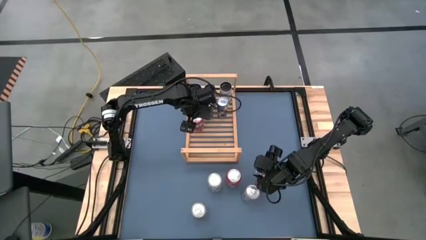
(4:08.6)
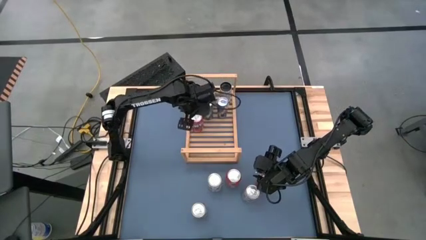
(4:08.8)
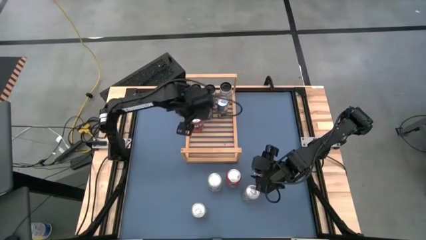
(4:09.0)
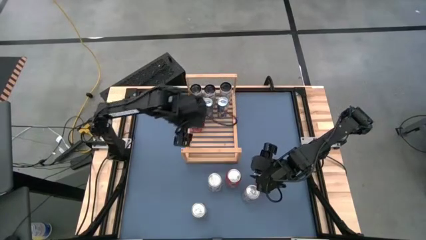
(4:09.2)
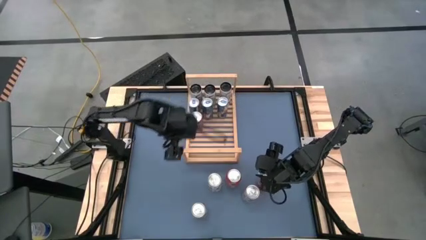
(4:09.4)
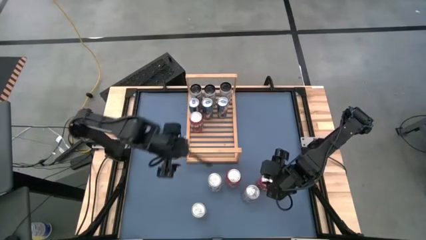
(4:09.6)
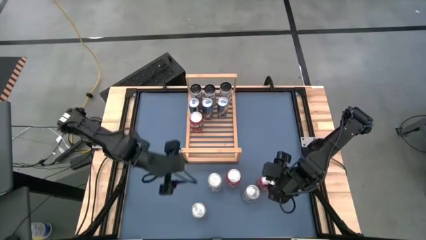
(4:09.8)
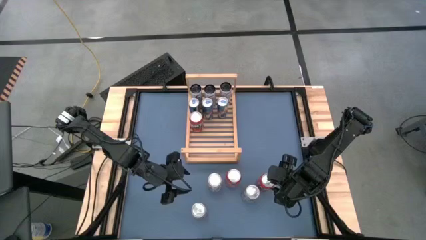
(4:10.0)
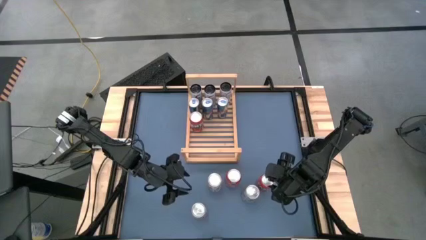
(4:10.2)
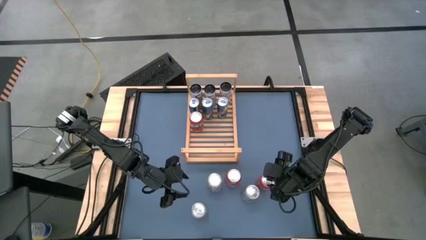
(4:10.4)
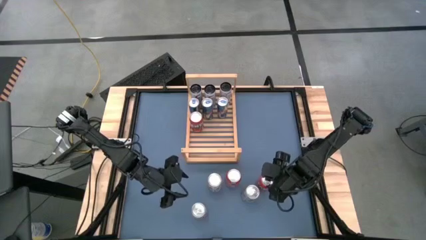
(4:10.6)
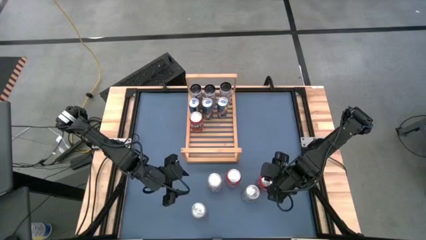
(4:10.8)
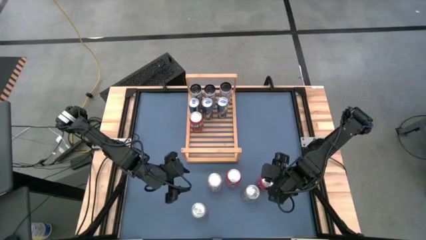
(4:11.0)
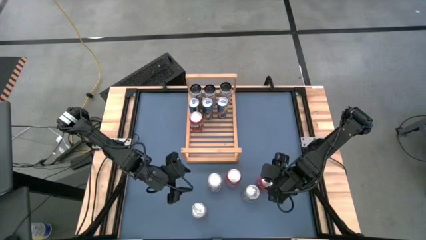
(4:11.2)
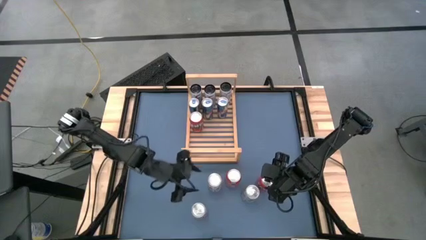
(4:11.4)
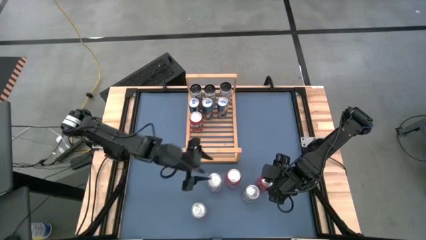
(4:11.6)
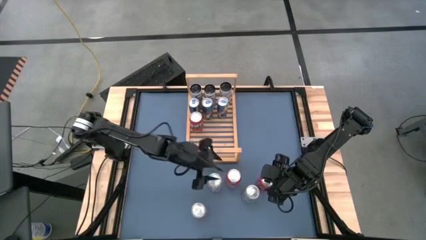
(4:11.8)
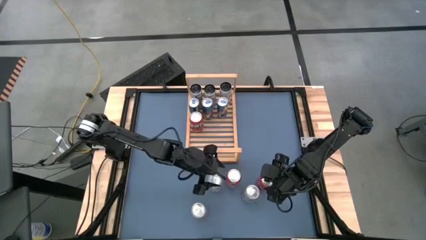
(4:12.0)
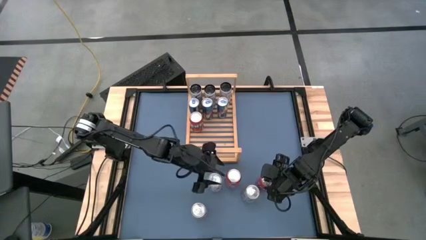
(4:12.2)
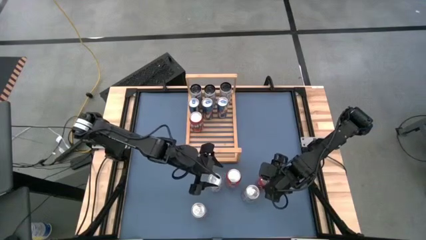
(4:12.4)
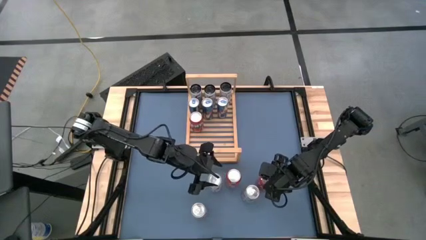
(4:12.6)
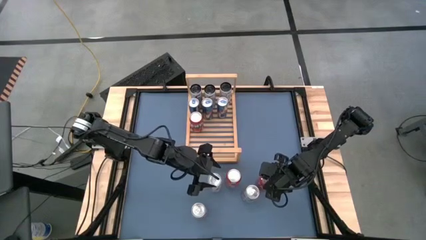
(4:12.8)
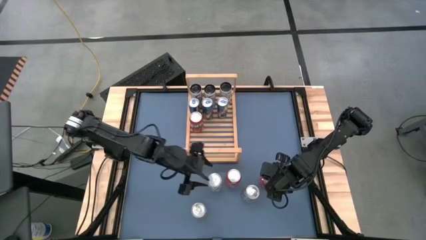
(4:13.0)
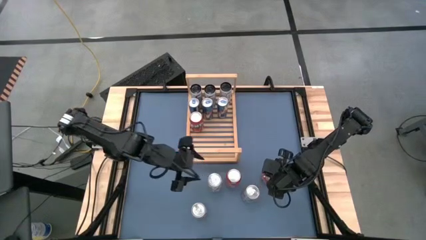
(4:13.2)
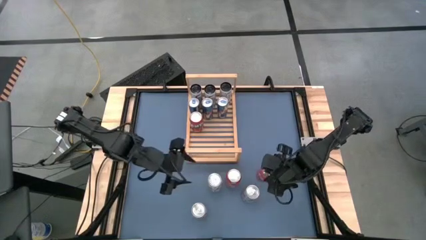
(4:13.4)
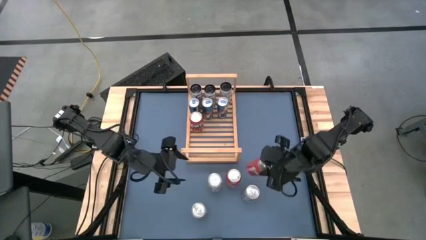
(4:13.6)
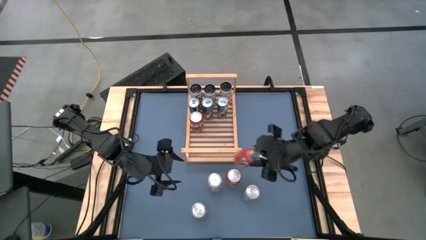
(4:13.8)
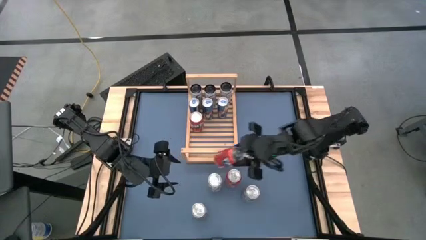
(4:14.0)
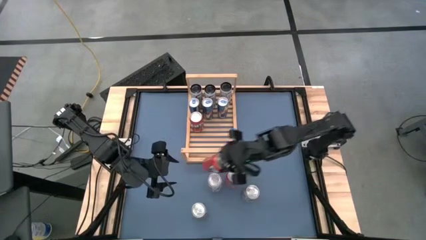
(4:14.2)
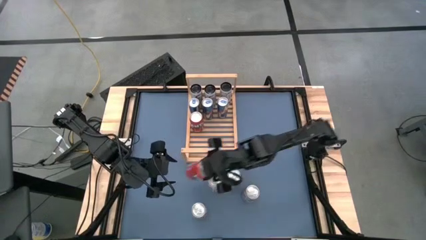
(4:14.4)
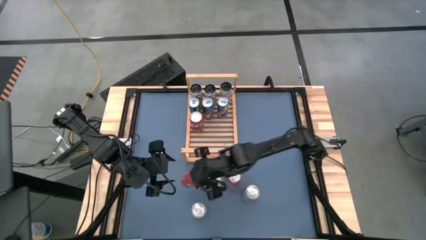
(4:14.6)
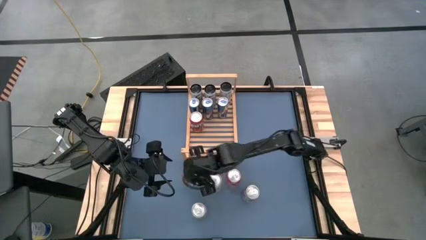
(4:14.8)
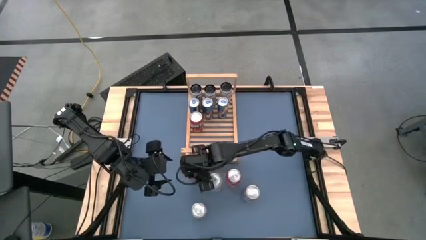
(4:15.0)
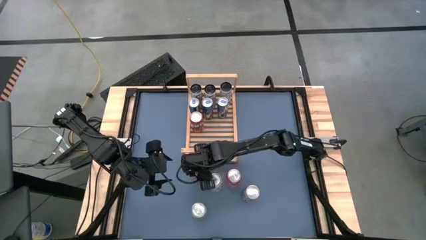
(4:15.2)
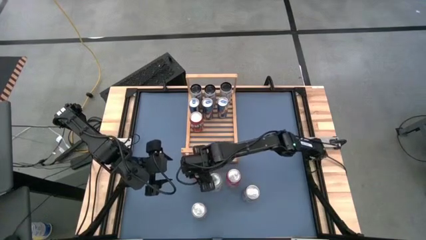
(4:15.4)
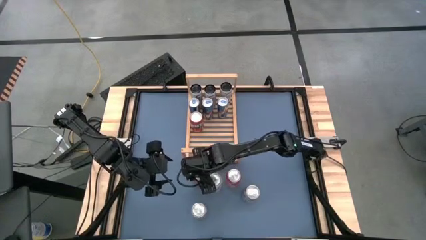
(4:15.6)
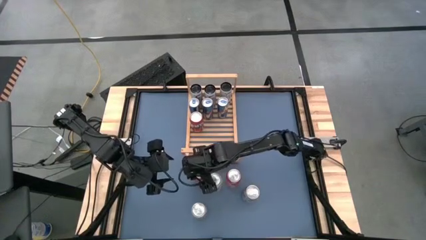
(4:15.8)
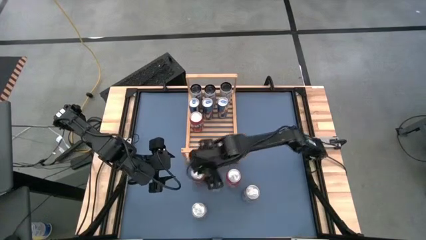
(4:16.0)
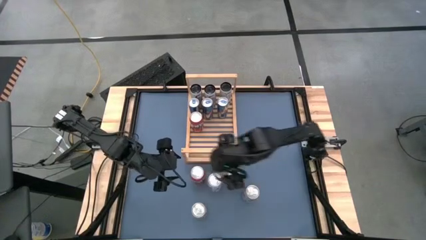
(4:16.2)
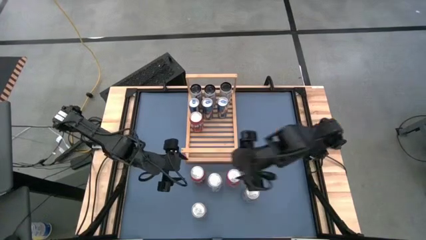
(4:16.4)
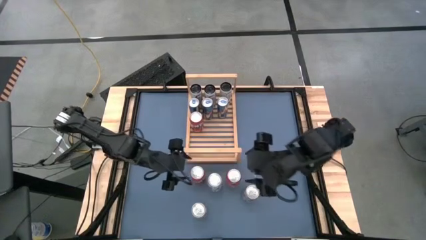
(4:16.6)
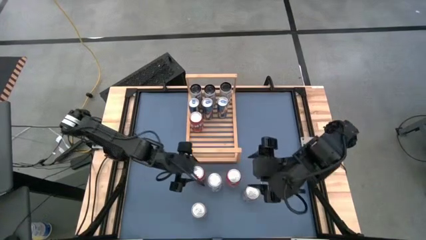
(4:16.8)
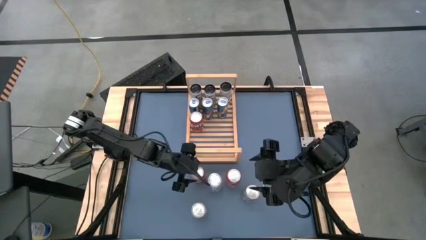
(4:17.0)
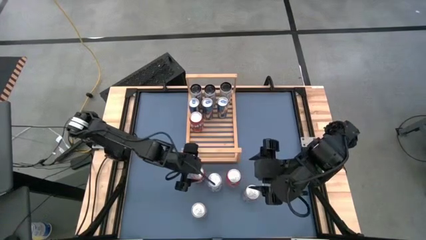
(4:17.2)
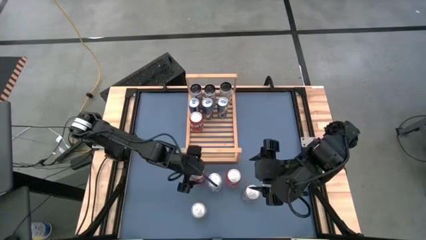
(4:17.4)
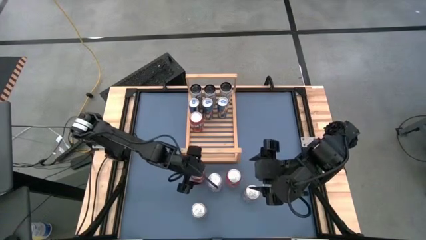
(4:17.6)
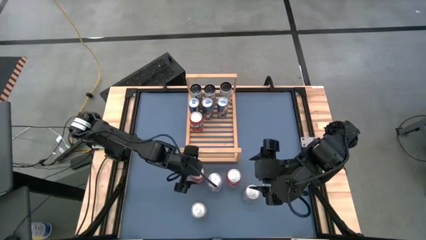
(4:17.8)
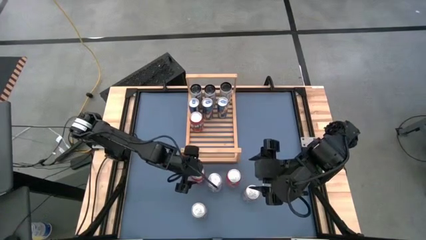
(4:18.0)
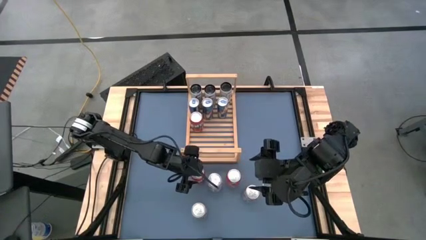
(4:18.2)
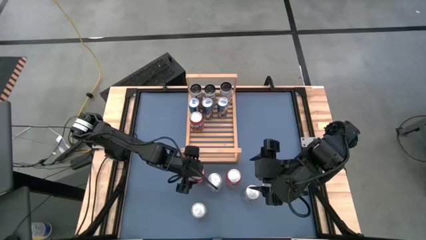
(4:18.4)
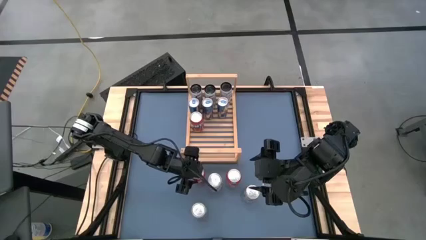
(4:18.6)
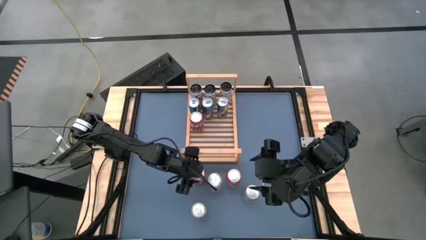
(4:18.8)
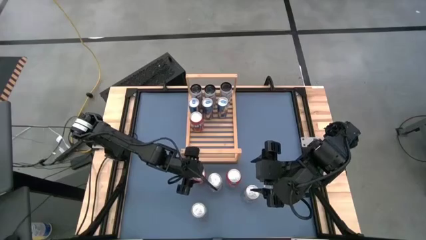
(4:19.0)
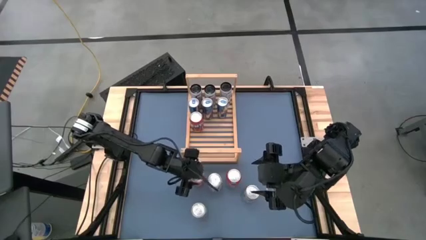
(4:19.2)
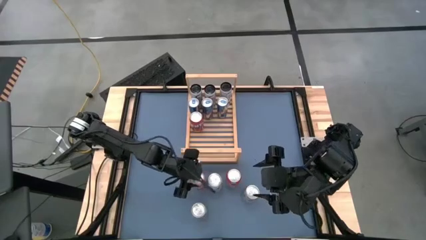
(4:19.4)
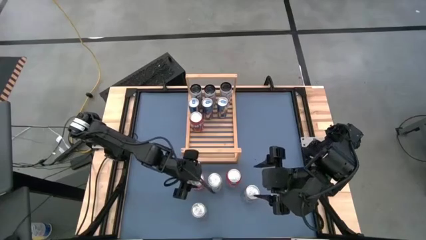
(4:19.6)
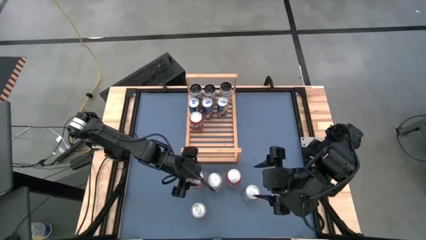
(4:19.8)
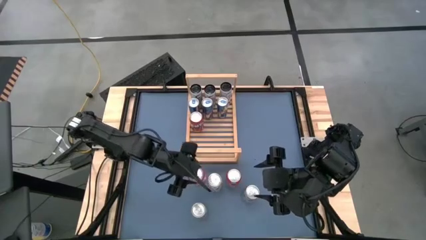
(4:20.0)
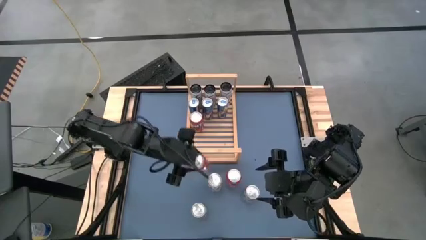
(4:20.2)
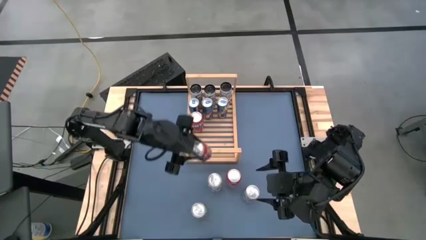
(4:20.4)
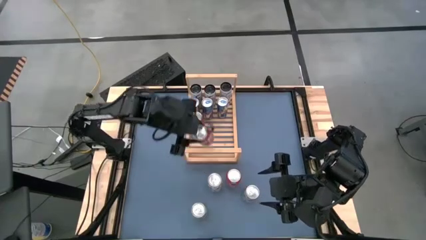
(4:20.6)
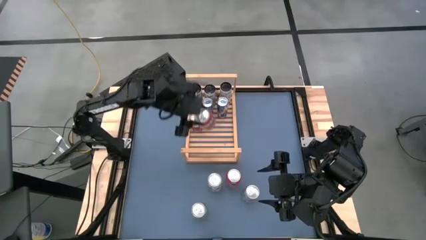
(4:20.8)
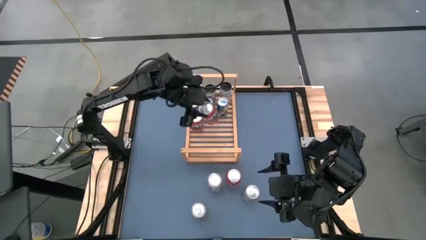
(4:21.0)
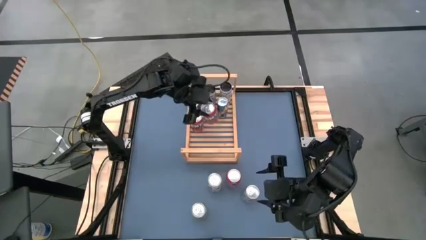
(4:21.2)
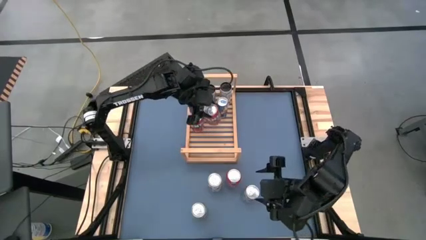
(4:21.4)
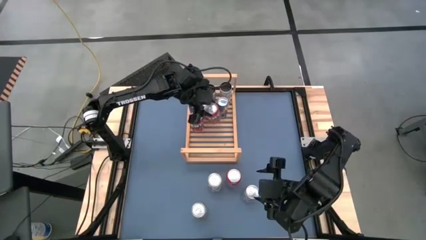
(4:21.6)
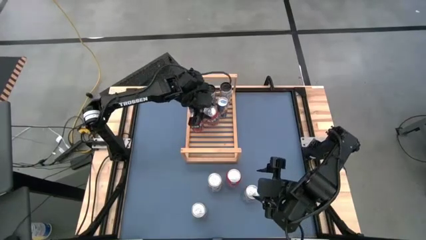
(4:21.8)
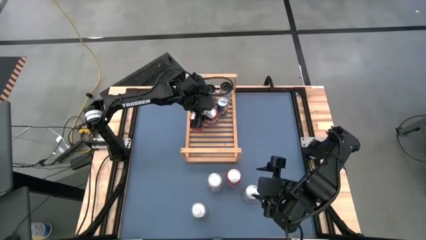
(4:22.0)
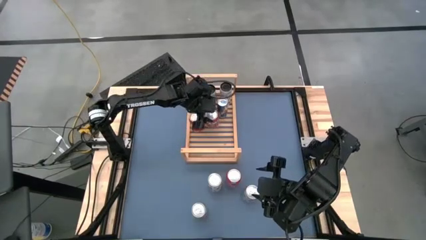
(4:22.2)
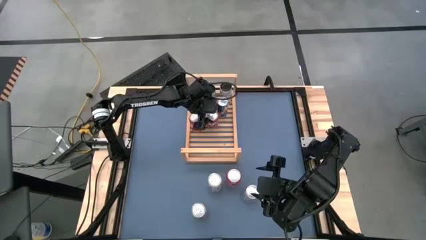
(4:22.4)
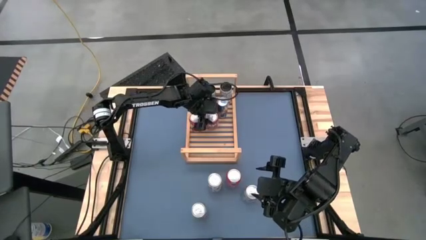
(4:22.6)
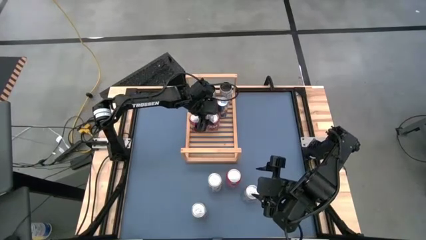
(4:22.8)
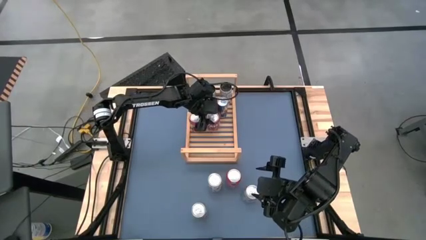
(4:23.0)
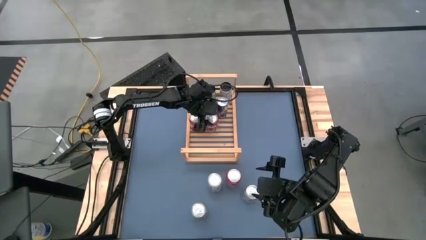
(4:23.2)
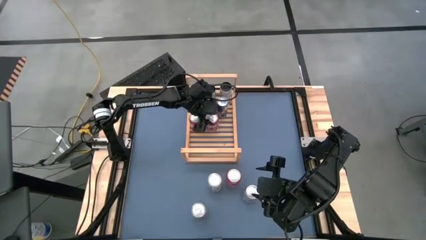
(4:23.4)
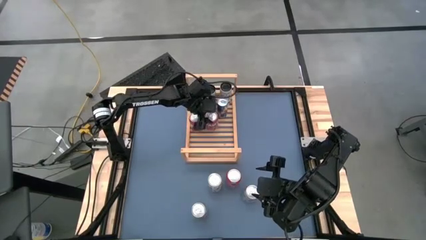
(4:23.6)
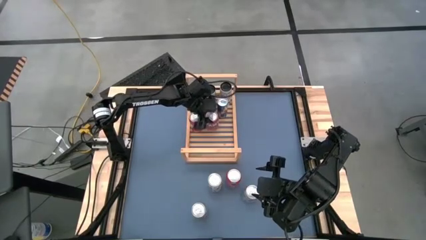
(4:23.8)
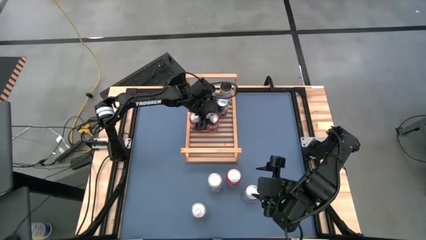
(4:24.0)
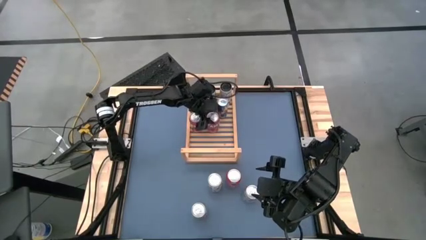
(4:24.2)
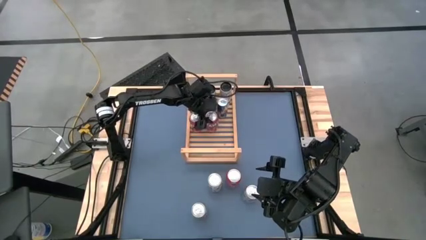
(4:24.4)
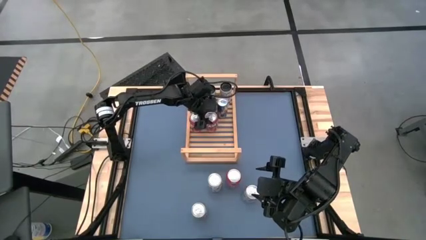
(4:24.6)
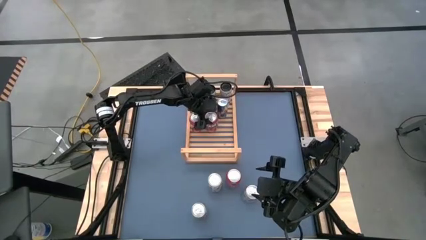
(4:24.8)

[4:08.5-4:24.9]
Task: Place canned beverage on shelf
Put the right orange soda can on the shelf aligned with the other orange soda can
